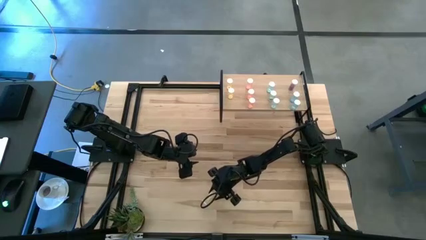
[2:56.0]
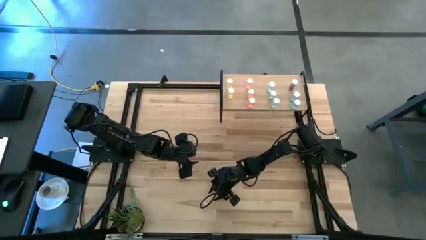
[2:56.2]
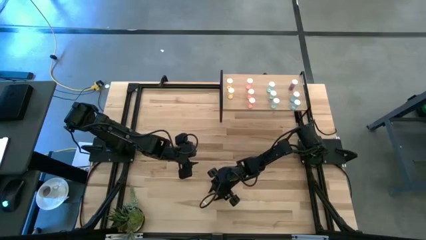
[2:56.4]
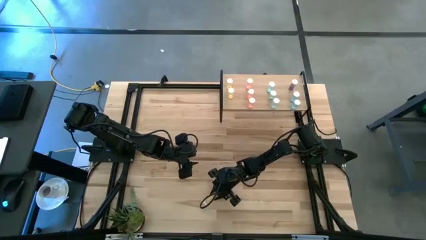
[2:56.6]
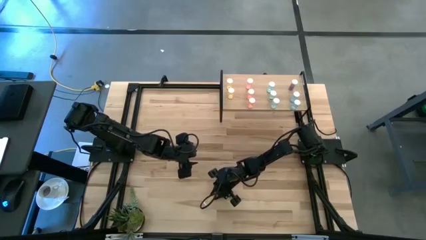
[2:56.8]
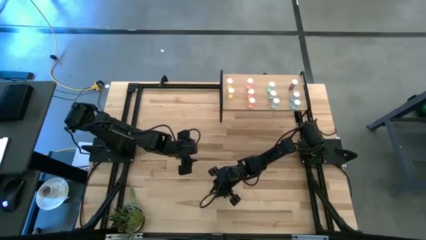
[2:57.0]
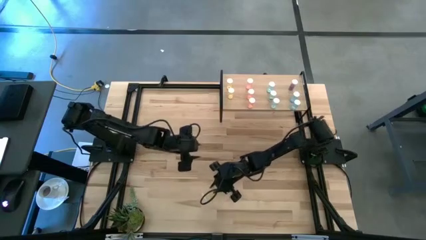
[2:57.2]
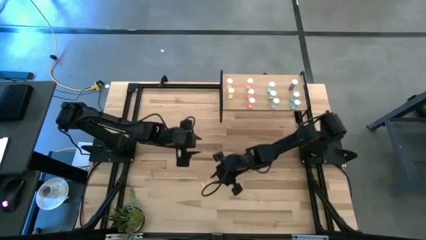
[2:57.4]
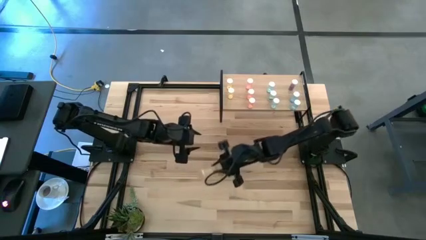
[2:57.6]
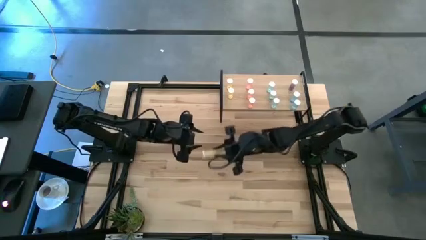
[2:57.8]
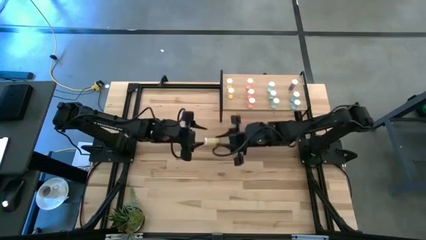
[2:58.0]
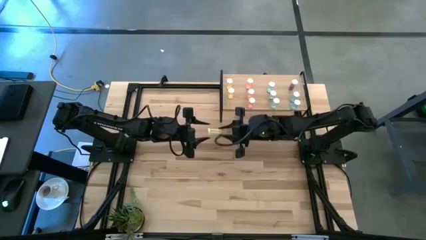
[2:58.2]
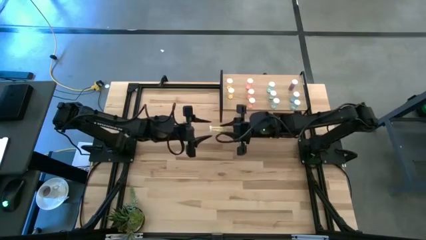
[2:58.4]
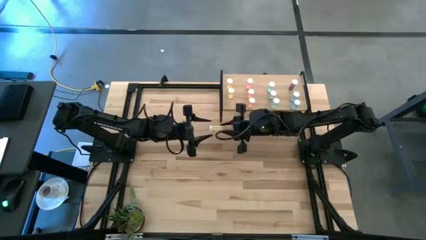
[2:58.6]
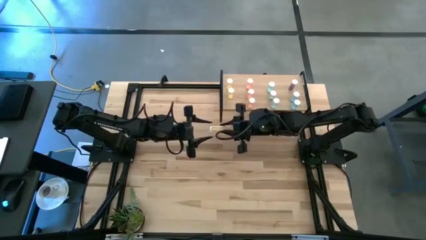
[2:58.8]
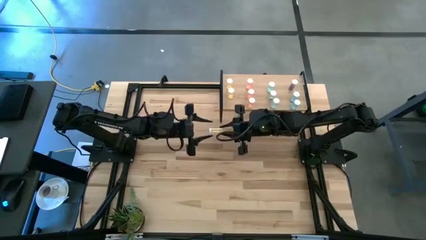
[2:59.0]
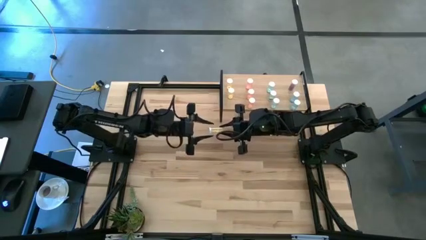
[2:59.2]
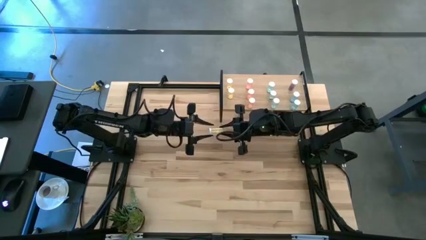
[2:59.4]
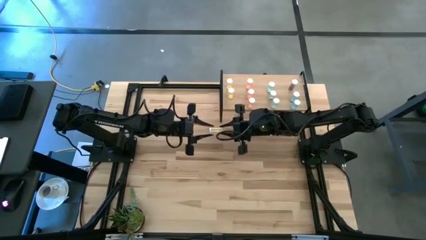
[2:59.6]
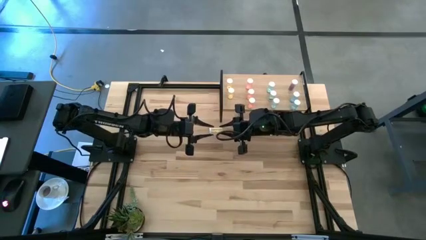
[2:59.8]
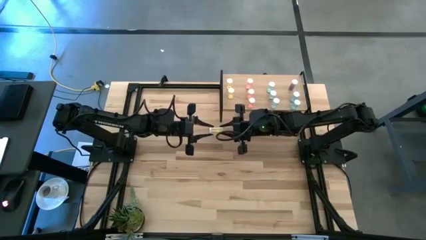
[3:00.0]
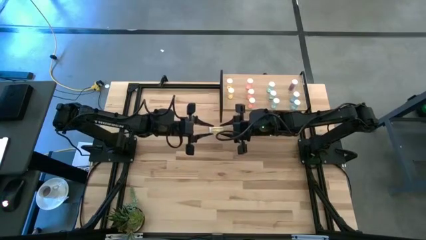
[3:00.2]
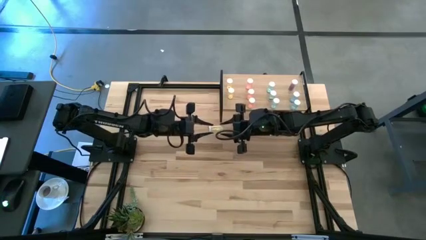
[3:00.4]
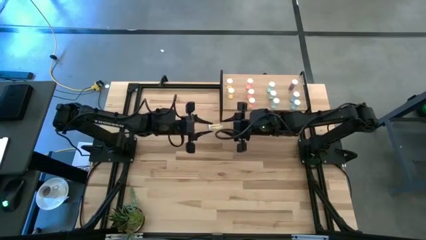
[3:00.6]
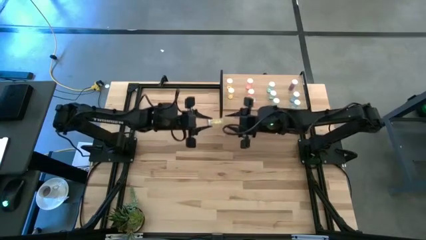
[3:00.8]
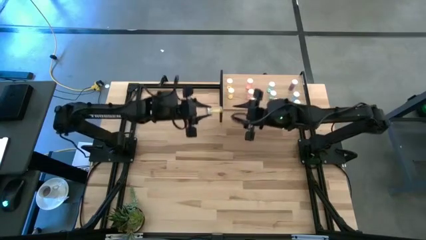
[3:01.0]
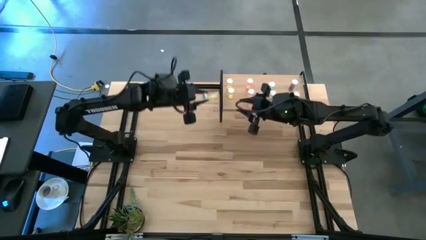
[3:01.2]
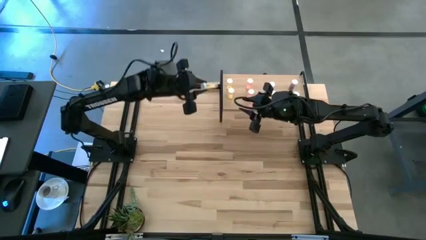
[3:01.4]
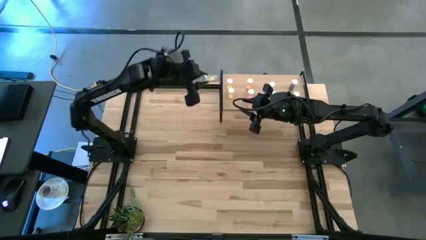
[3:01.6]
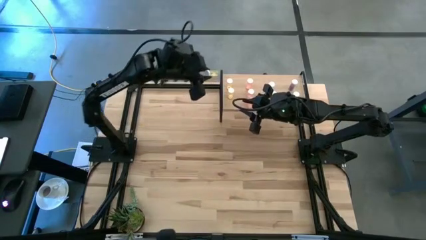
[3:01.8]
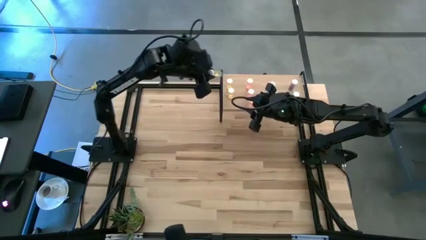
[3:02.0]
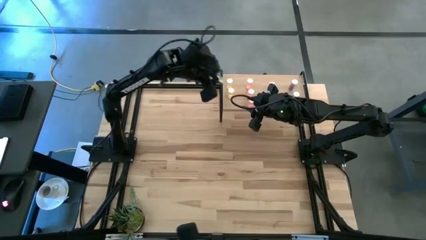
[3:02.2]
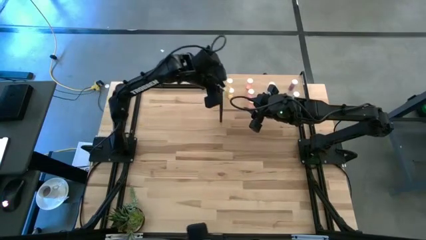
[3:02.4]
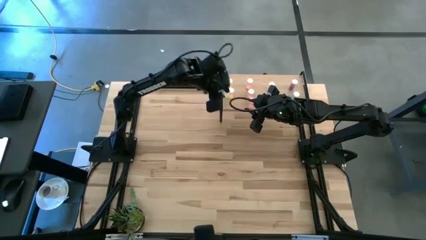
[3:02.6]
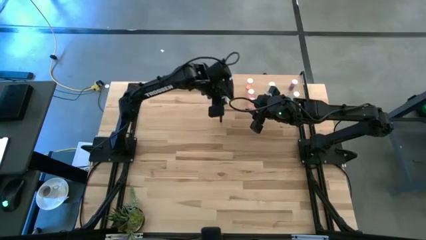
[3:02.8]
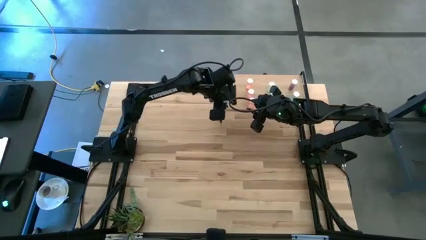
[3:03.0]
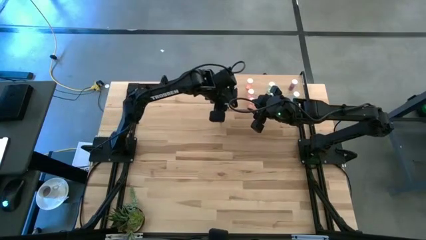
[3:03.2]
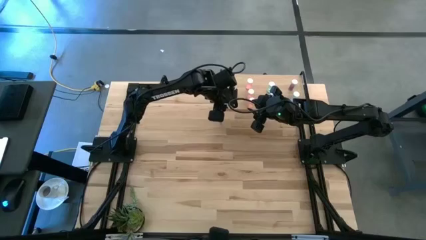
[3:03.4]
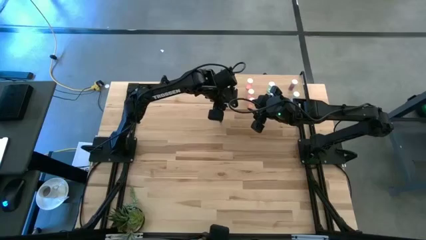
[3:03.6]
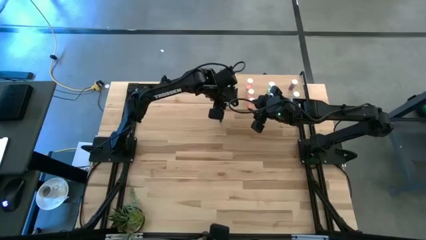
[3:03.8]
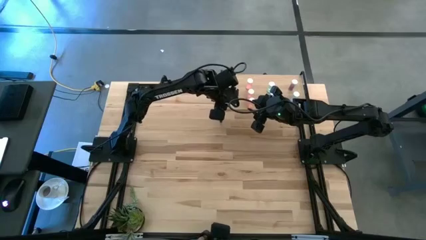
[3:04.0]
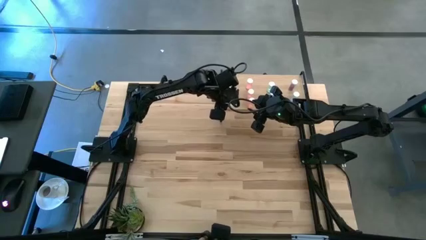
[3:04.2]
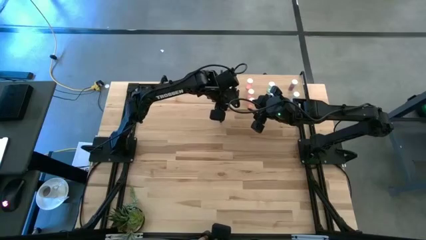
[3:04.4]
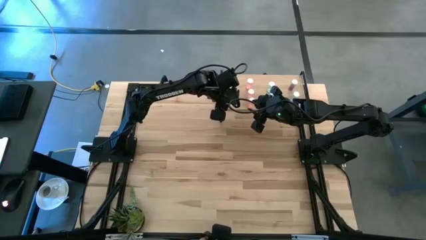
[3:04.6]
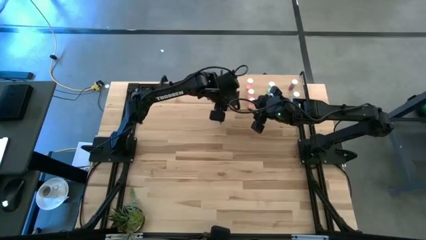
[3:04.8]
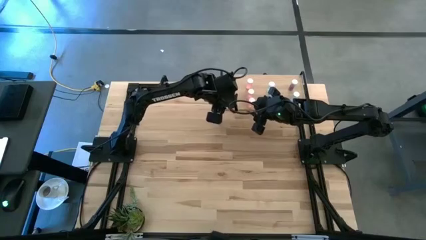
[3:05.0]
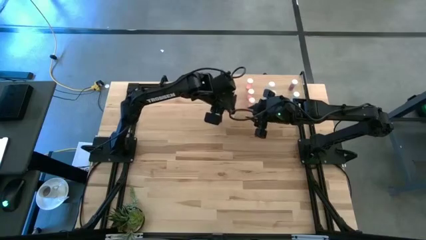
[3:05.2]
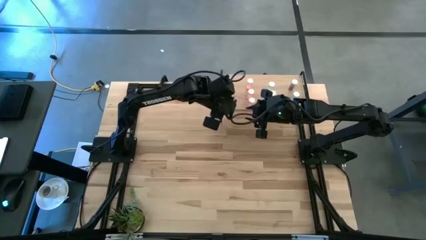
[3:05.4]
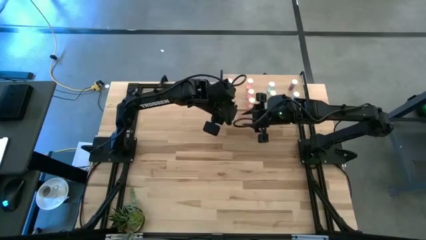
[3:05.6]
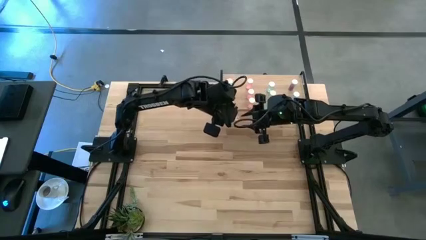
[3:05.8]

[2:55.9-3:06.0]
Task: Pick and place medicine bottles onto shelf by color
Put the yellow pill bottle on the shelf aligned with the other yellow pill bottles

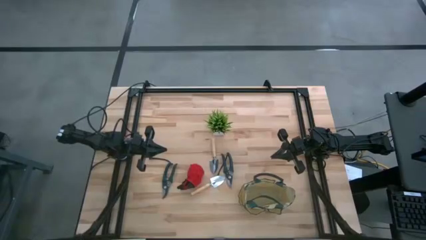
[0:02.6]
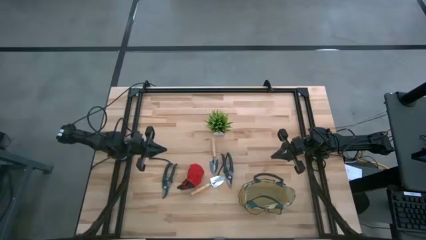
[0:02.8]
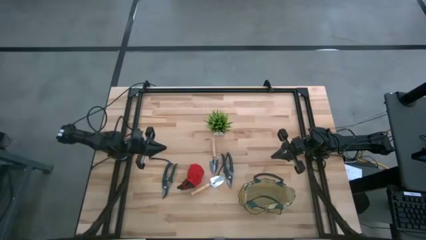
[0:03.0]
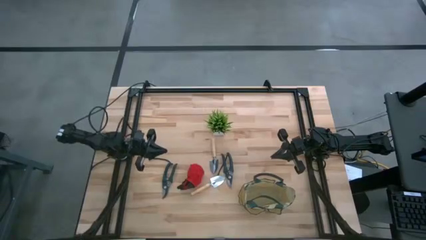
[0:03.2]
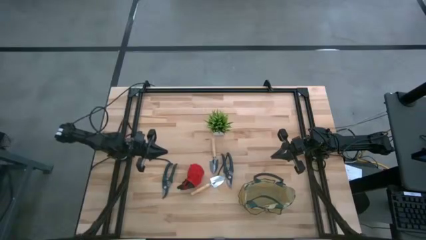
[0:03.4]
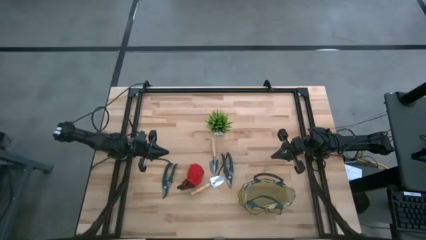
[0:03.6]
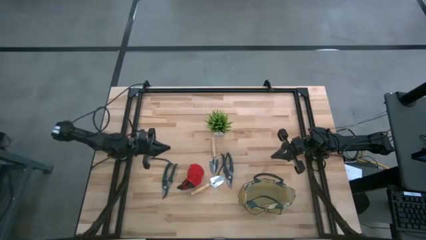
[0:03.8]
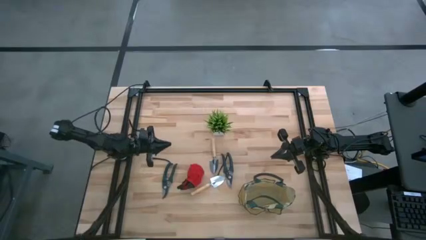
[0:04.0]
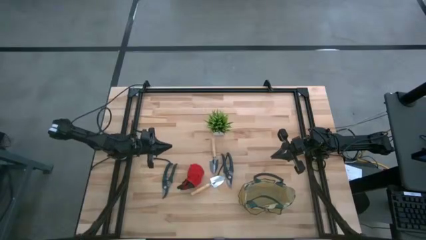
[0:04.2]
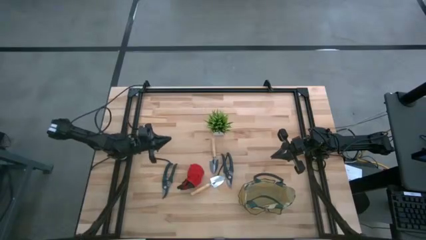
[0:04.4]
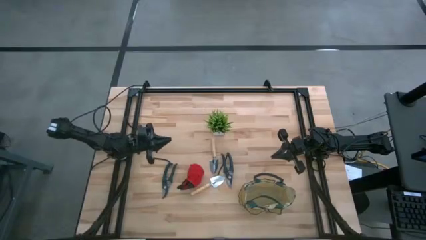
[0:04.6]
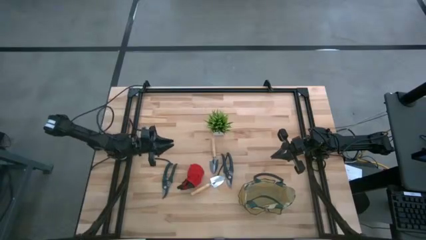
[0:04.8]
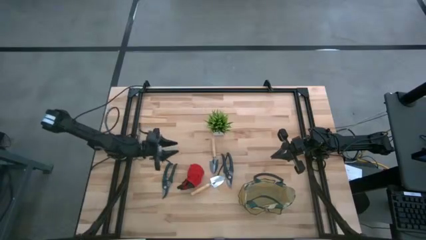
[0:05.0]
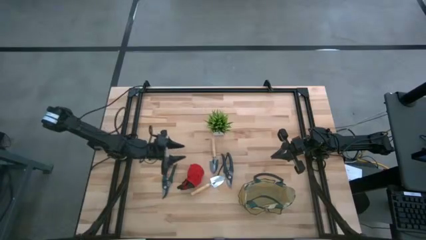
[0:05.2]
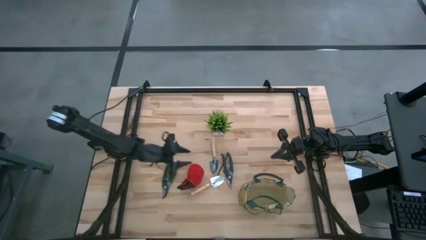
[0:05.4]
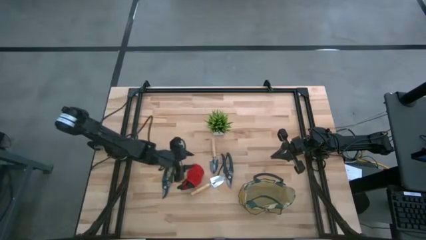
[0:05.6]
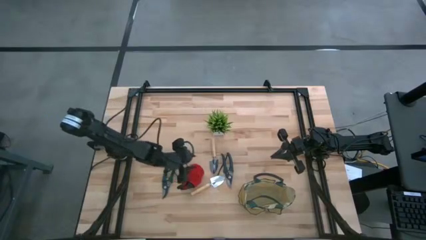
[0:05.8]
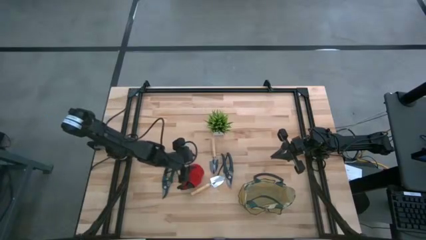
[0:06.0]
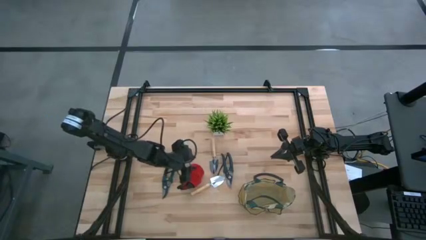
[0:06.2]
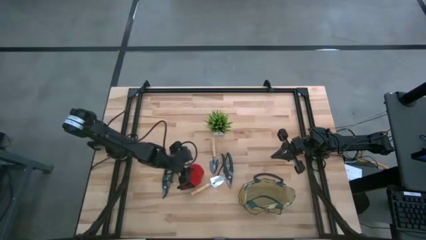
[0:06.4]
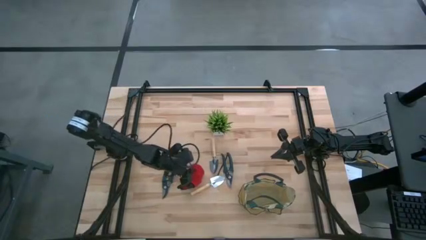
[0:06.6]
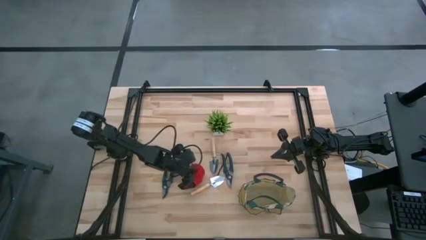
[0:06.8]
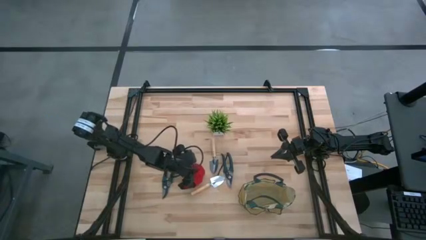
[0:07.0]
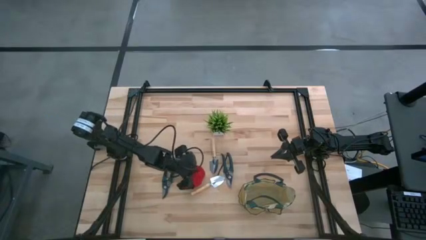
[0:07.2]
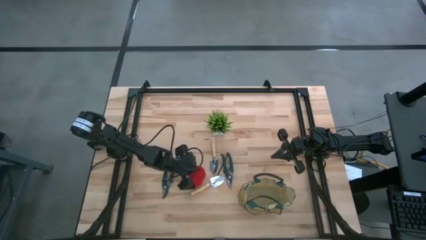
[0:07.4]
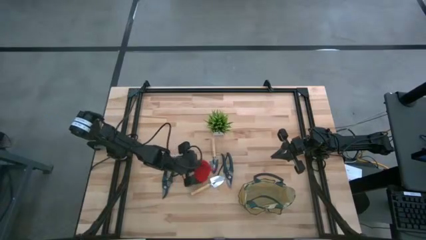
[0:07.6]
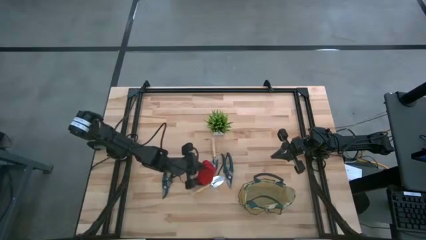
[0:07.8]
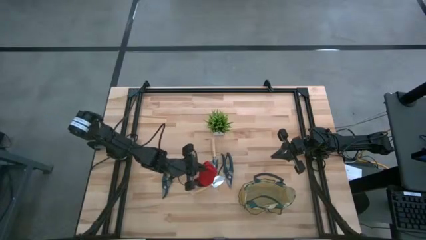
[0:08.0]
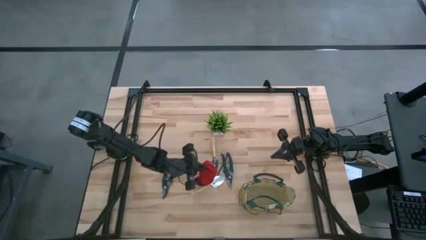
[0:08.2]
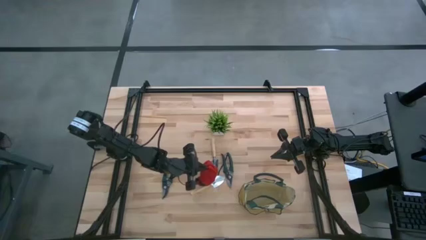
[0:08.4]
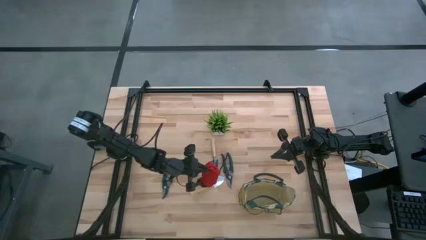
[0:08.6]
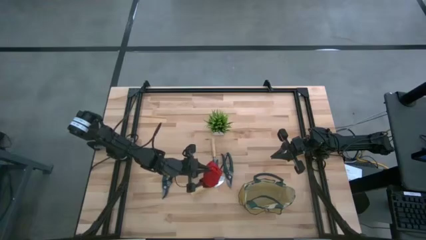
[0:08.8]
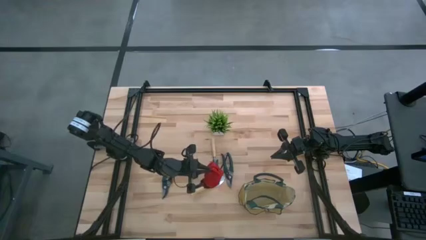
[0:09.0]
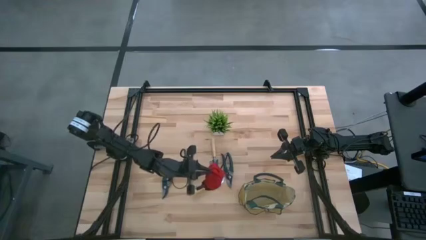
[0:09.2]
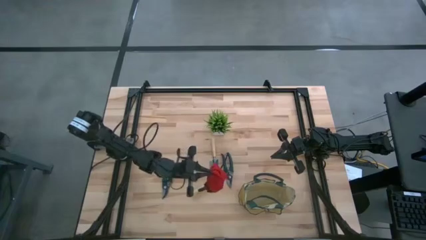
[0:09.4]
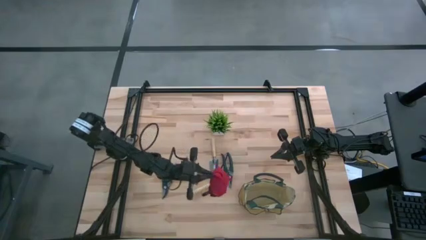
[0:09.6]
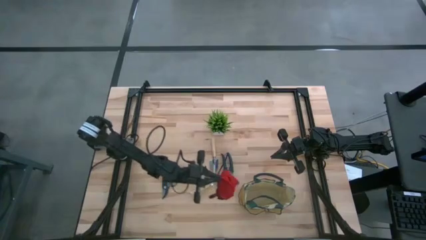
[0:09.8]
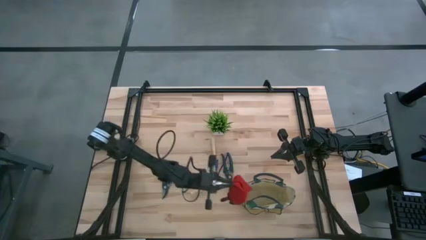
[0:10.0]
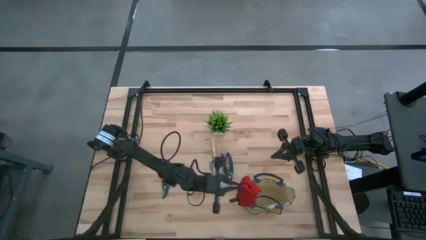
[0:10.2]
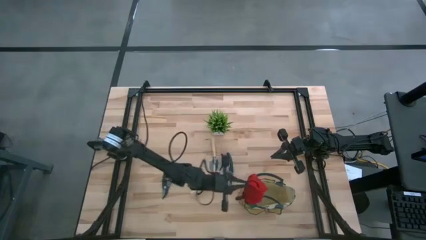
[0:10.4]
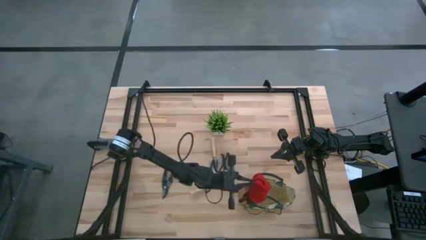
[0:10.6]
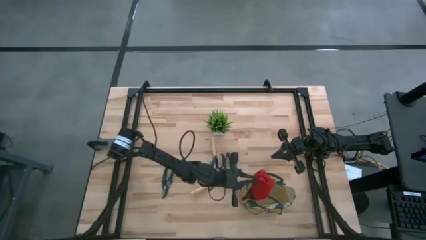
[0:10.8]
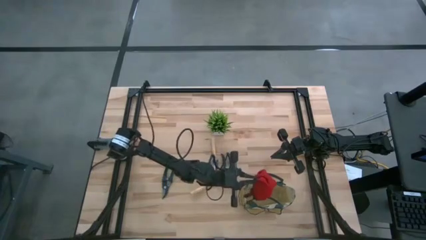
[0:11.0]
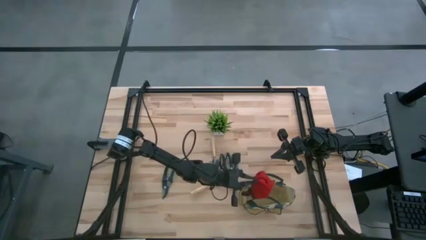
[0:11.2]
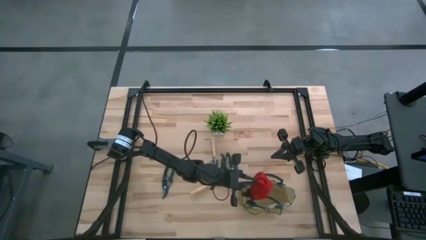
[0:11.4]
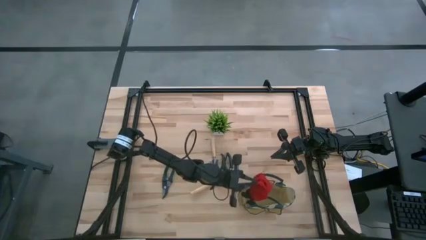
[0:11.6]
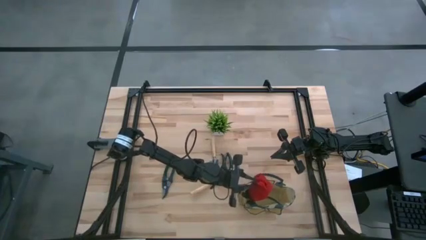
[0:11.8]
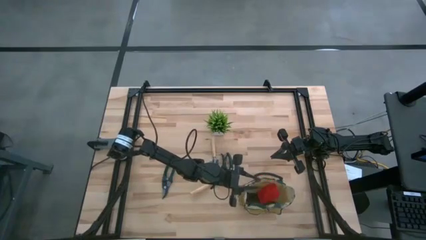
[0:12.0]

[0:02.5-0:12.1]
Task: Pick & Place Garden tools in Gardening bag
Put the red gloves into the green gardening bag
